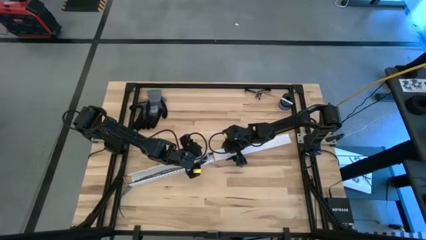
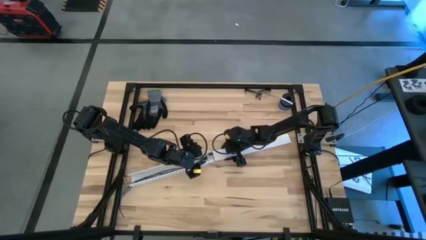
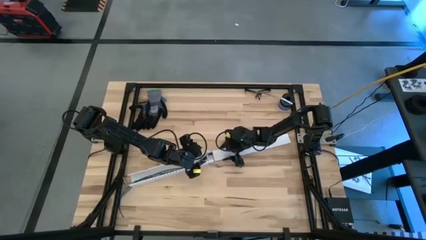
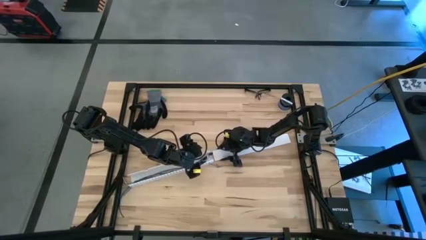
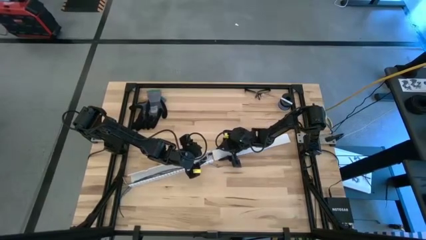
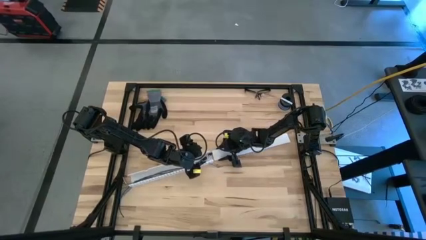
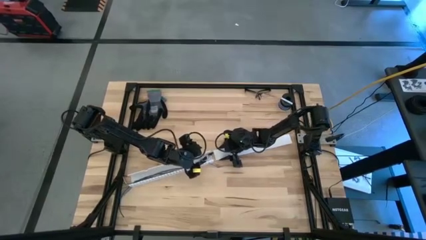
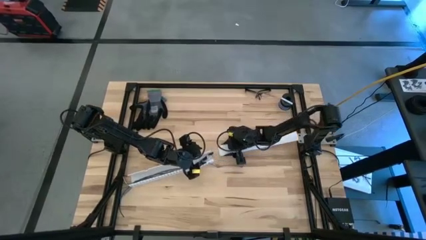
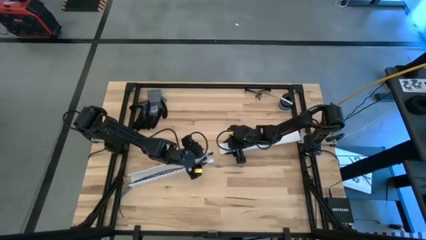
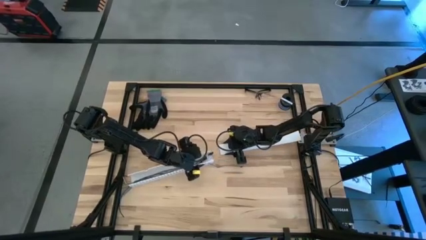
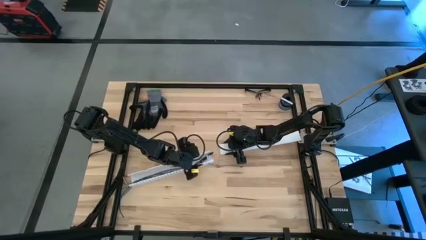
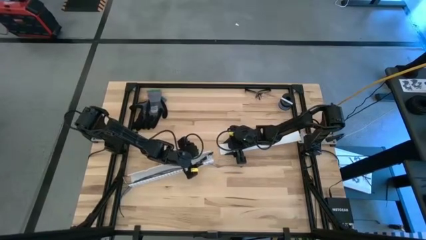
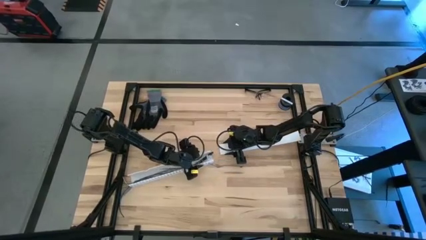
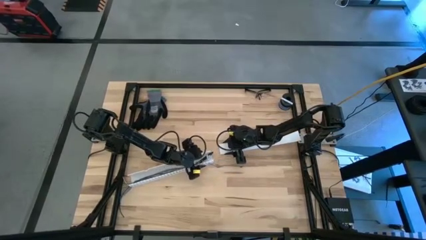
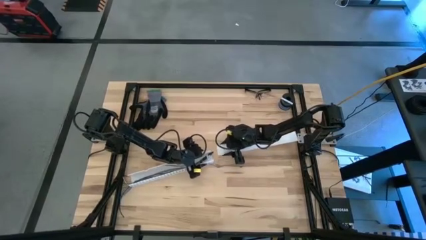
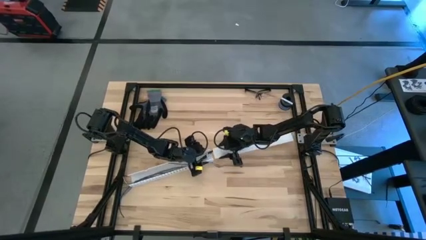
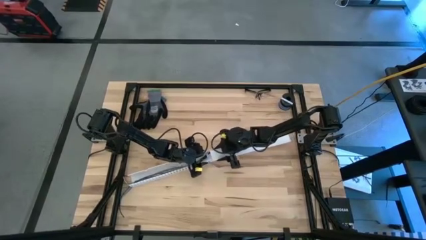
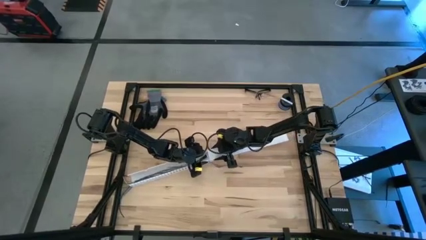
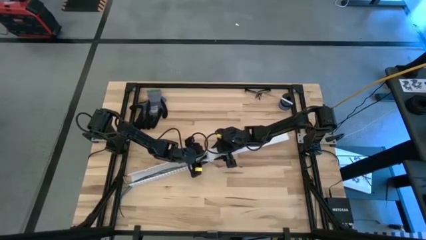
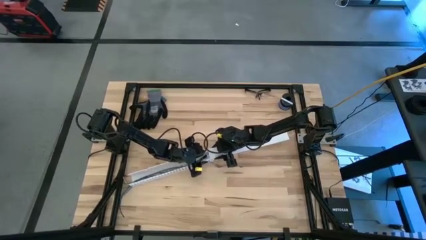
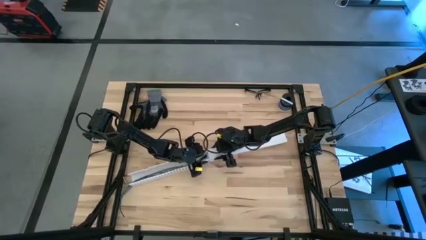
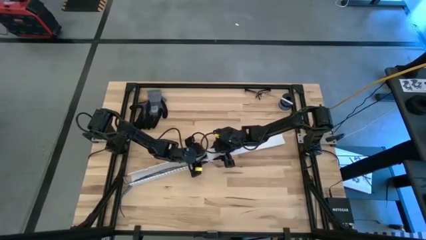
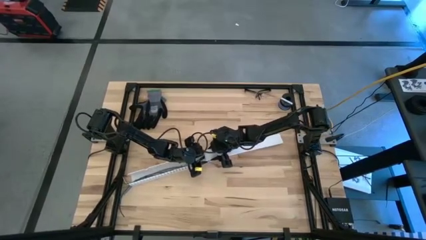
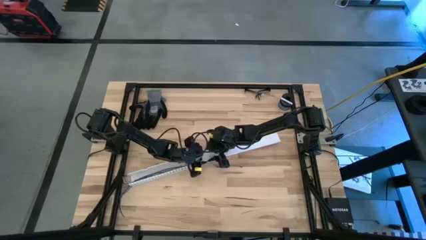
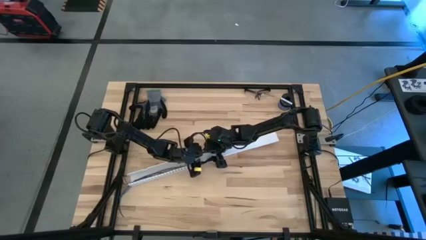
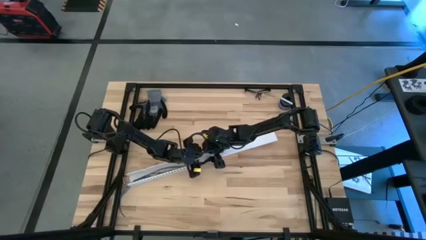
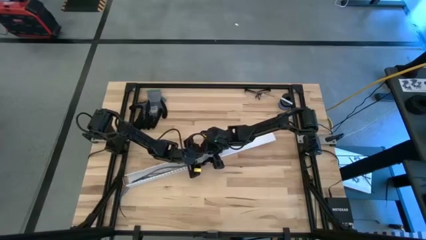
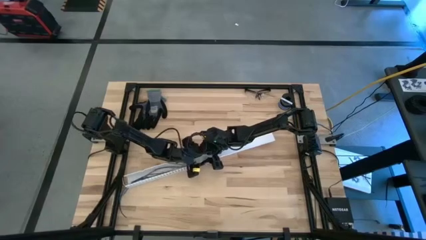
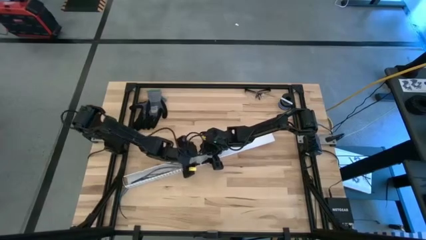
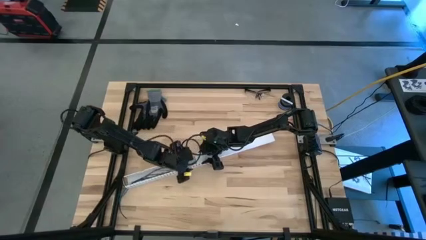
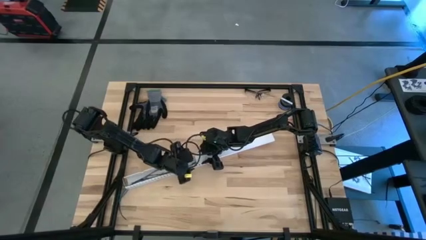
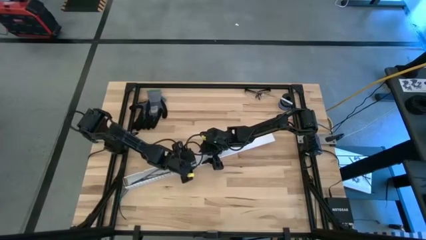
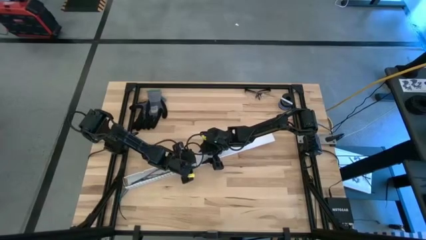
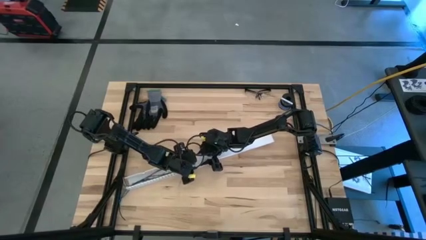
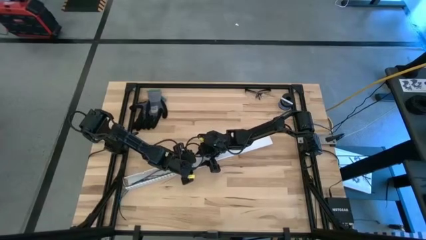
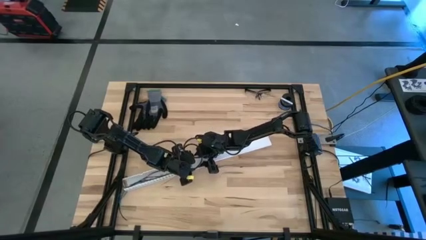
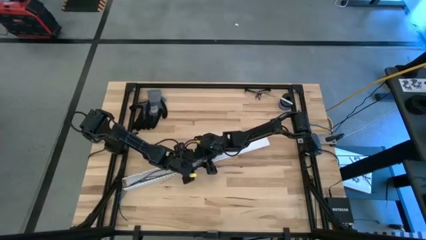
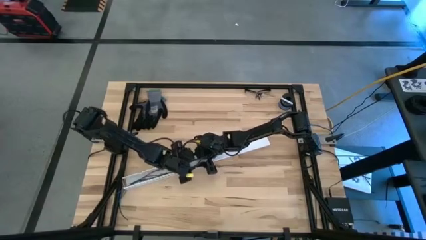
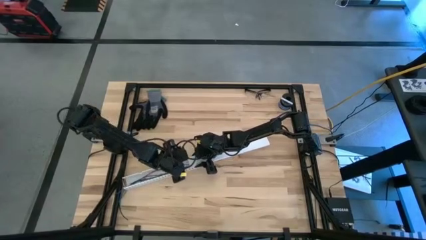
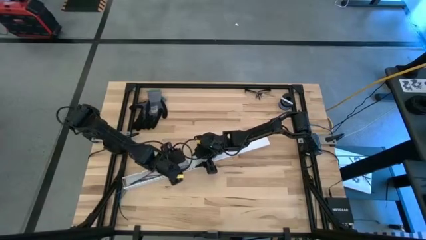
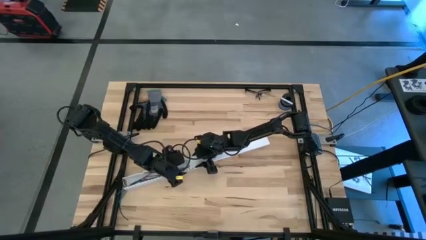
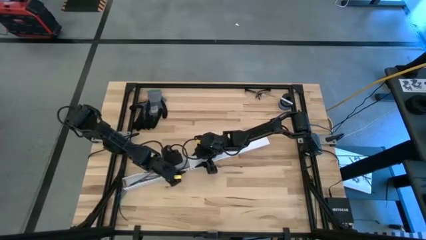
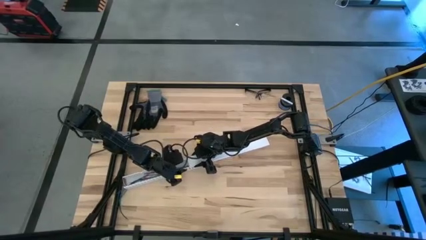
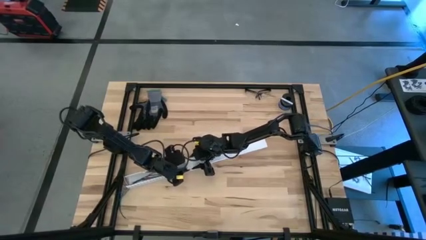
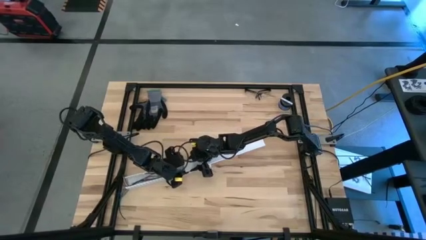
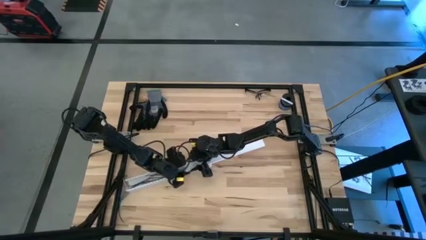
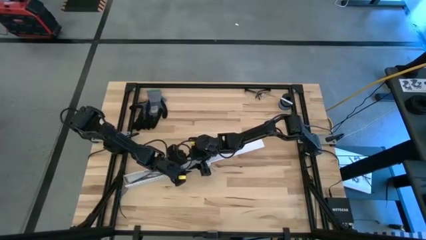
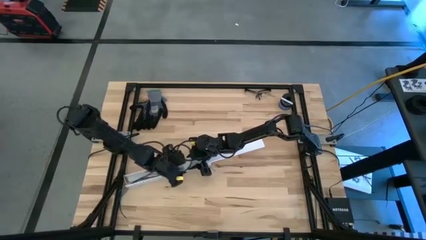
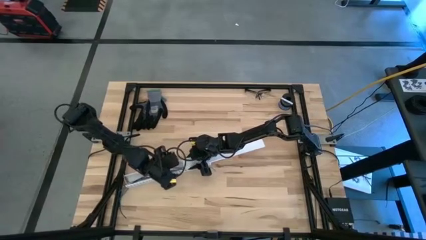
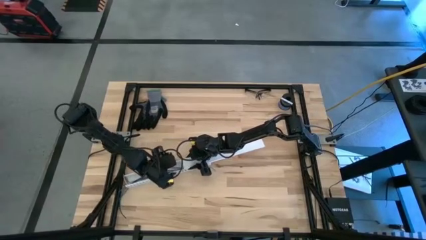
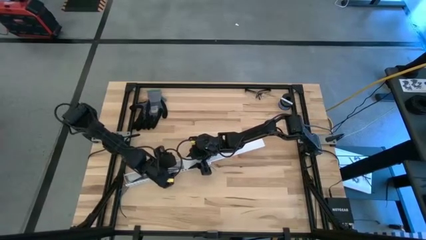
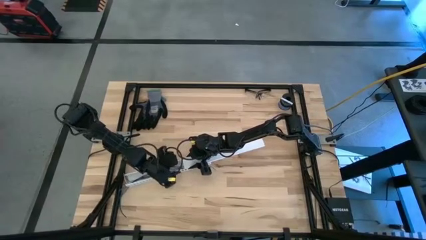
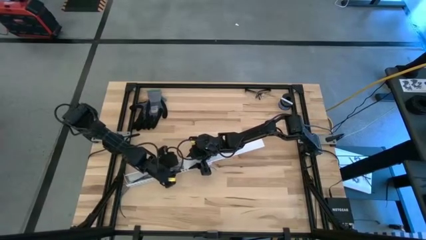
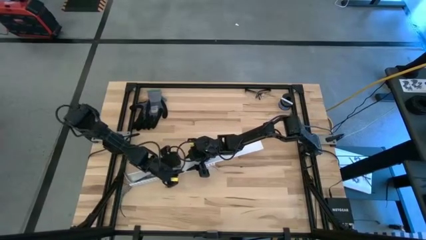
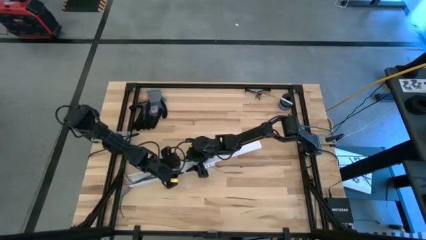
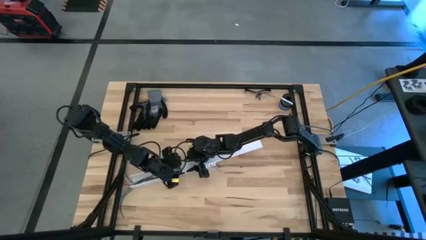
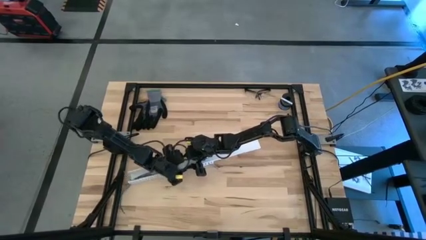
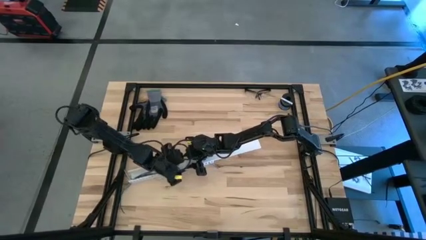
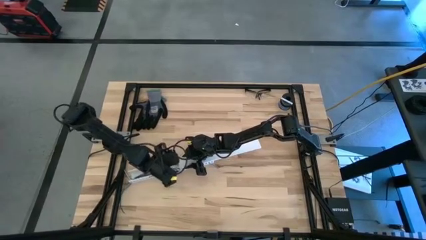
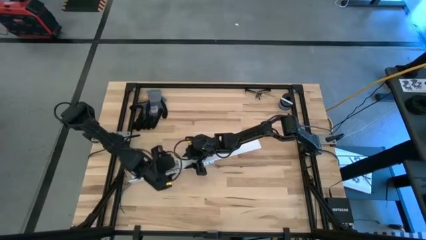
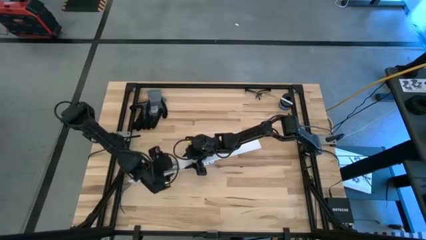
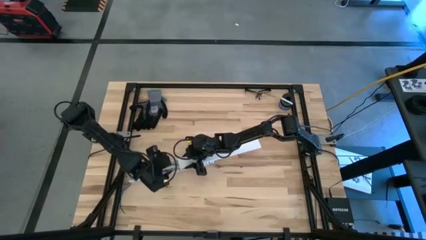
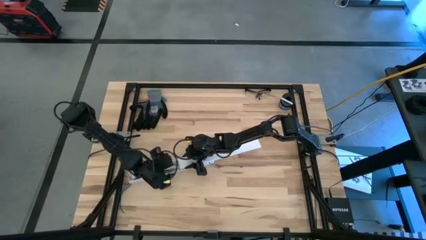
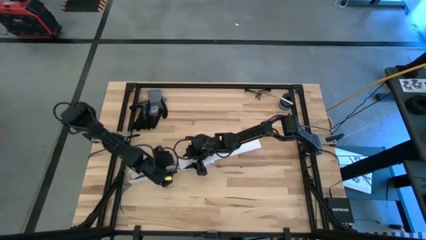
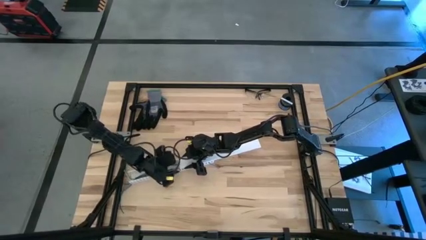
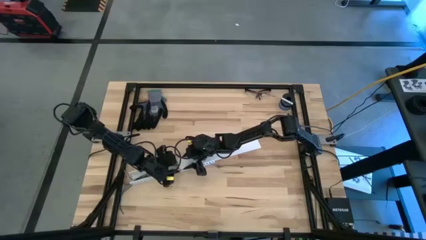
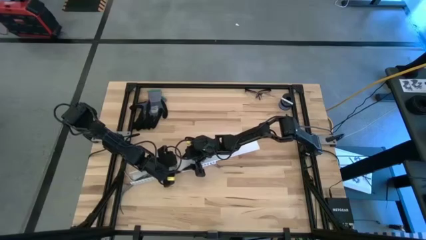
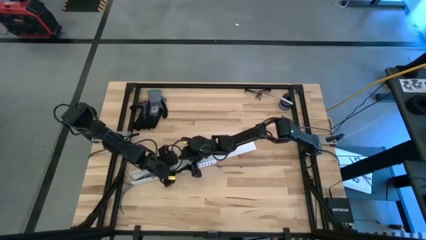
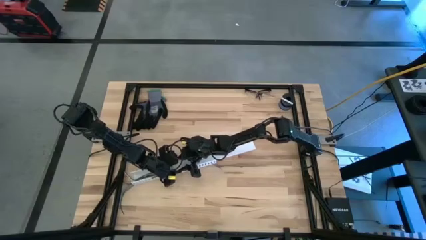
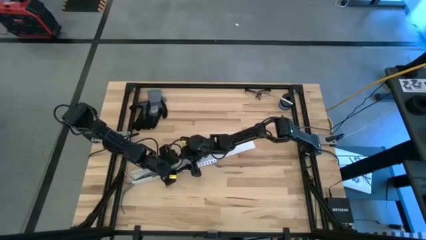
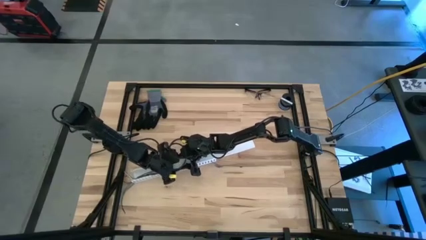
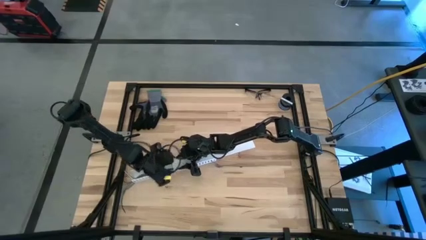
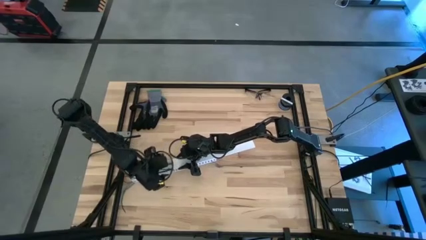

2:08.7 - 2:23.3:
Task: Ziptie cables
Close the white cable duct

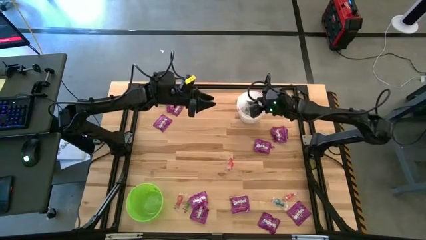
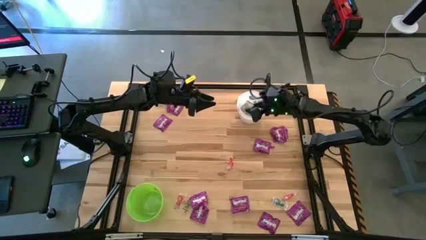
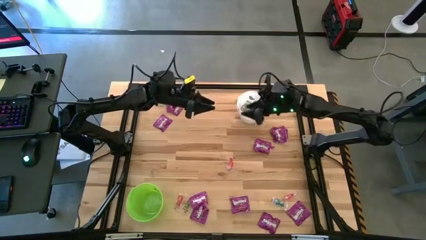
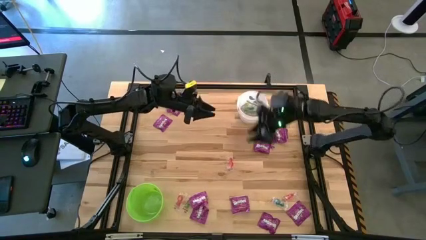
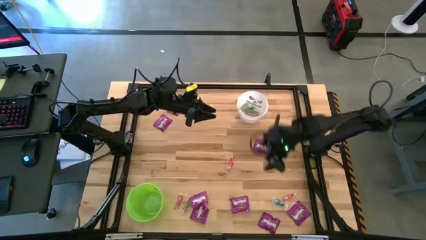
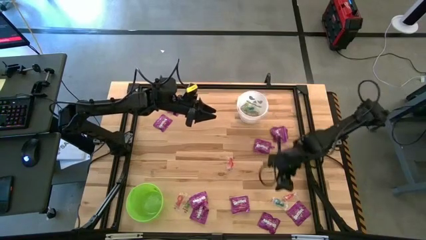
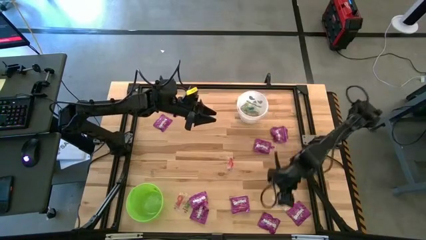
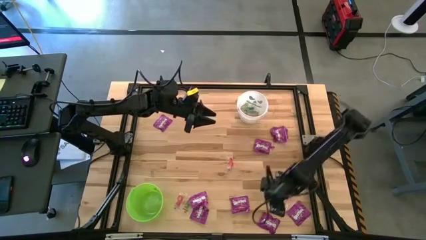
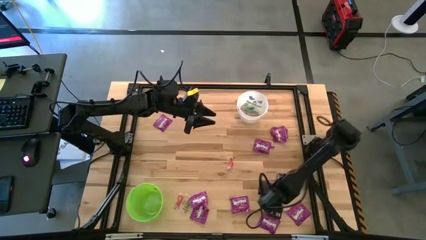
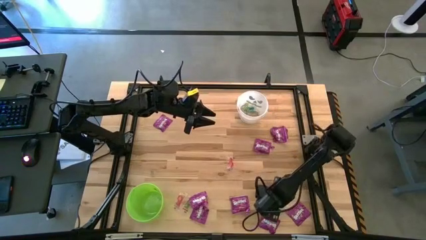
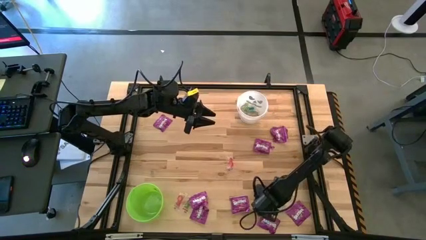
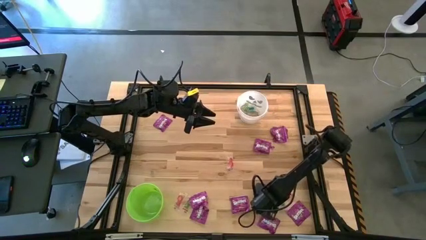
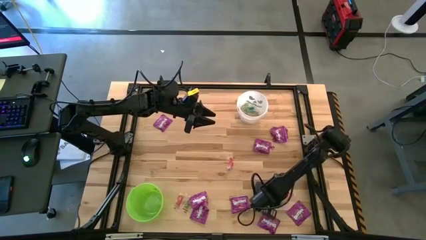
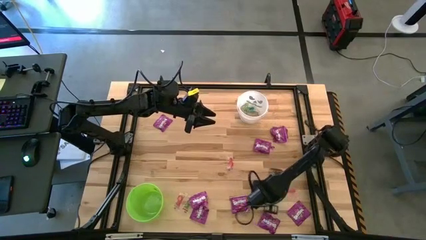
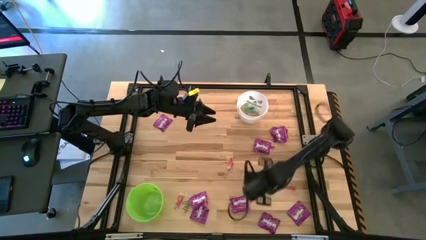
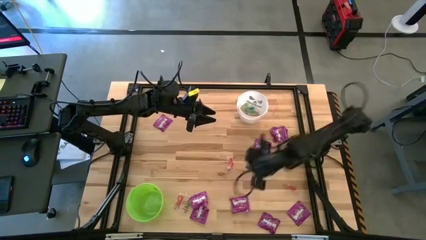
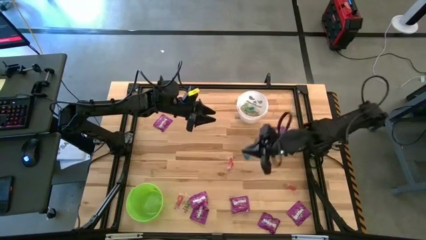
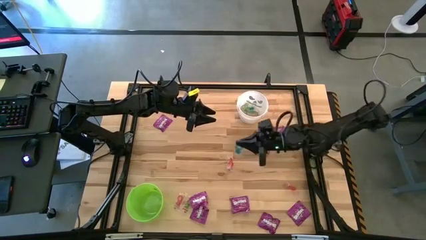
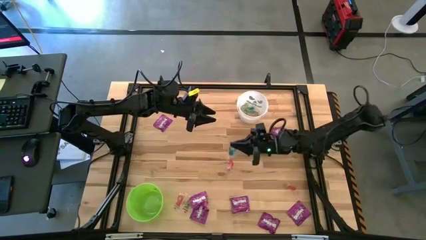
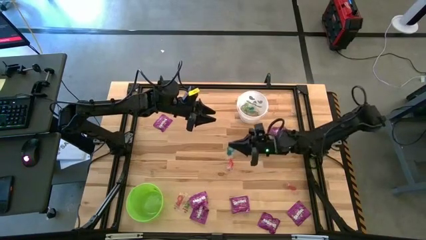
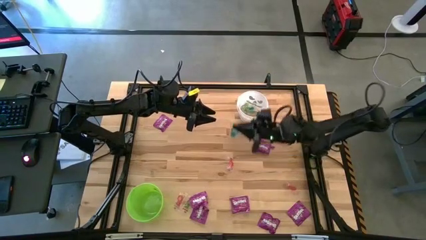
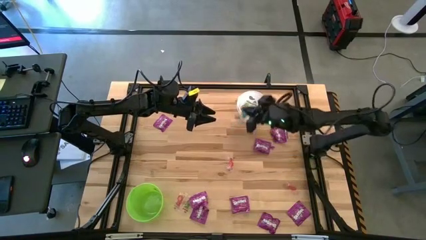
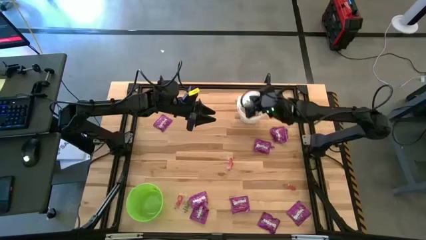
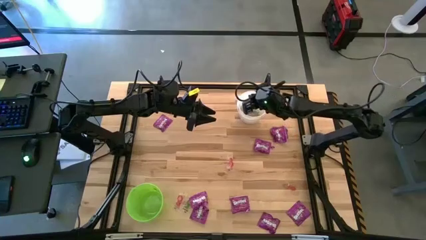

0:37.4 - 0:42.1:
Task: Sort candy by brand, put in halloween buckets
Put the blue gummy into the white bucket
